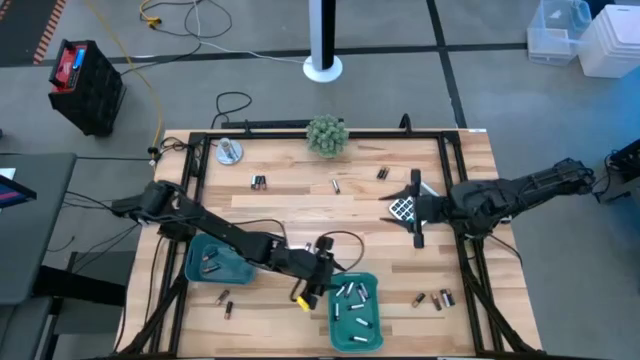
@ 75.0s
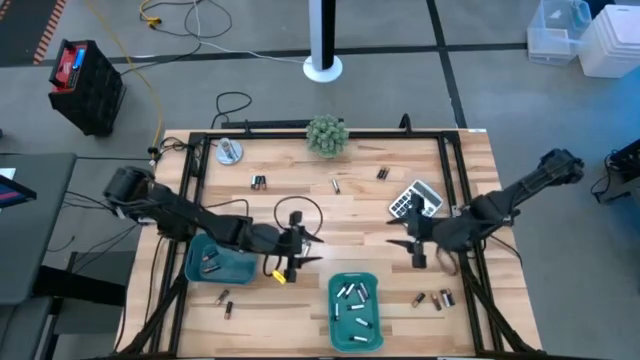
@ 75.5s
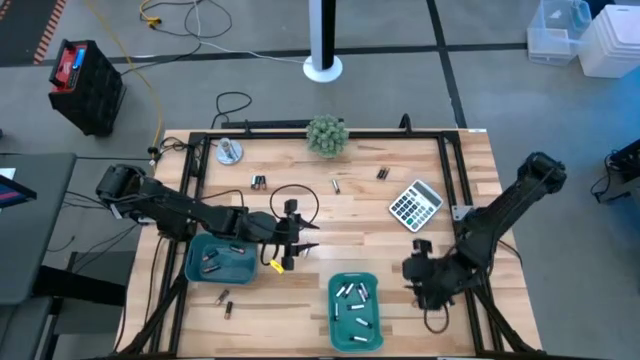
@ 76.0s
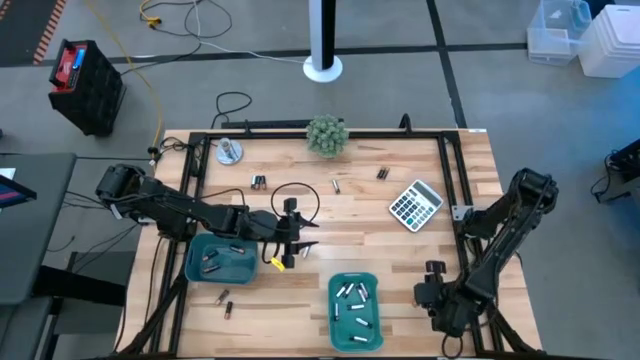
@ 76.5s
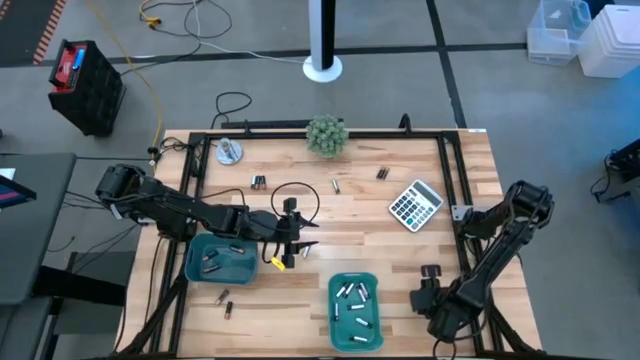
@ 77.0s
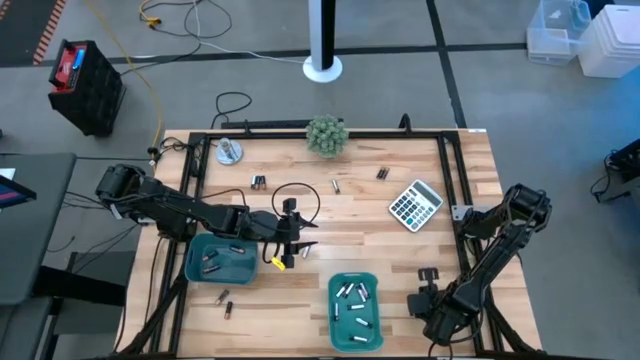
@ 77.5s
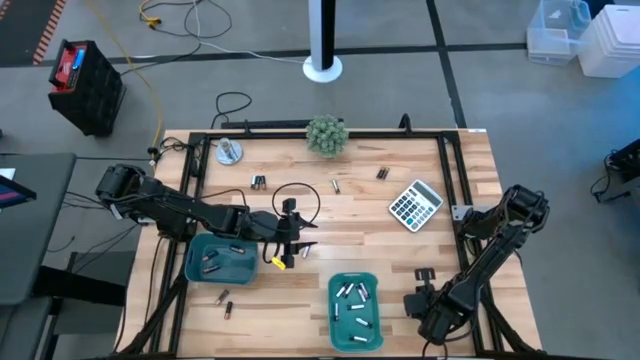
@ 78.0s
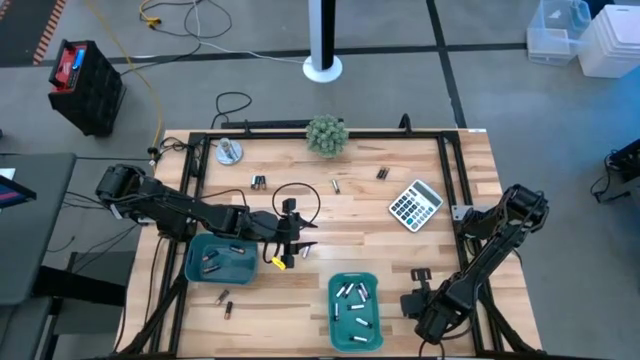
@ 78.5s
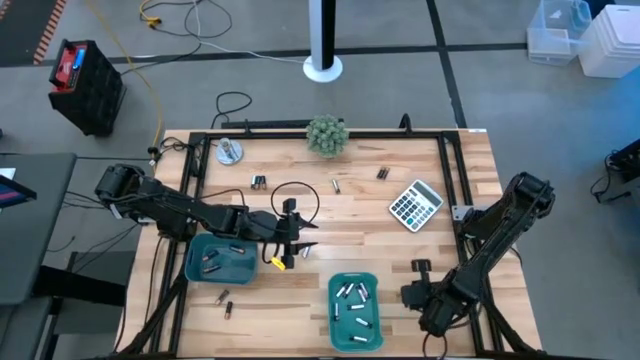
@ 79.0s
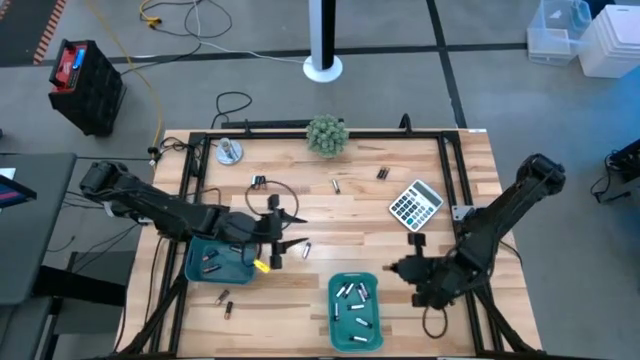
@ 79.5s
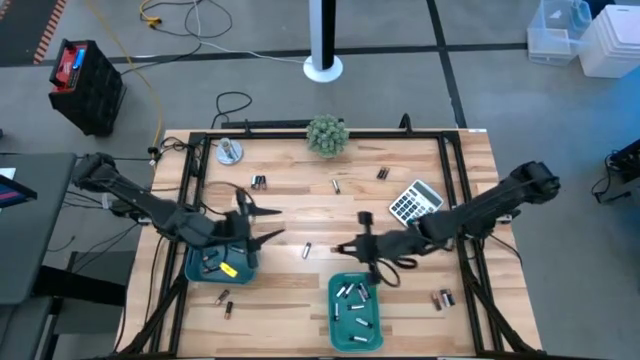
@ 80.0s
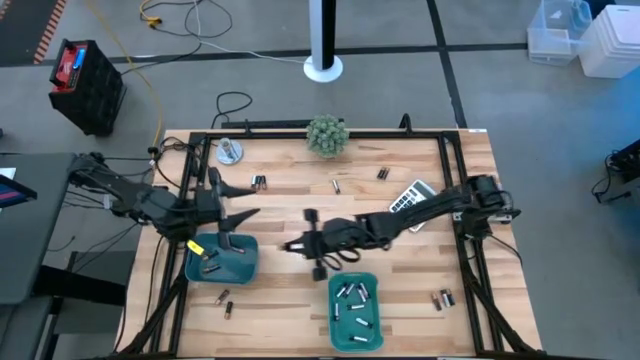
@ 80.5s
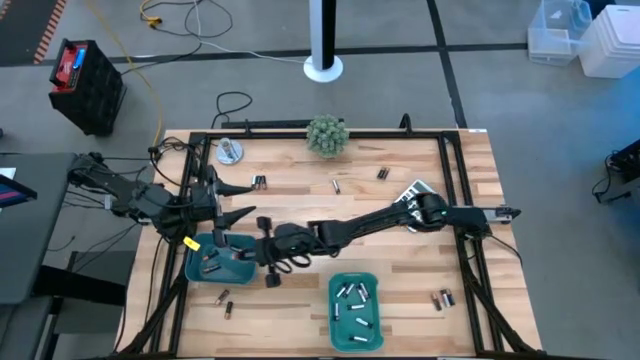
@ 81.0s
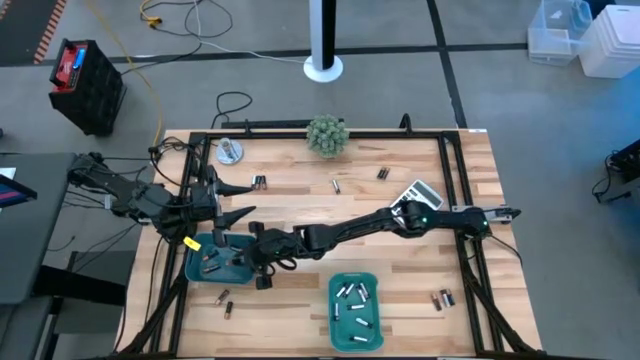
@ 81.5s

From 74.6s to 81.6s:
Task: Sort batteries
Put the black battery into the blue bin

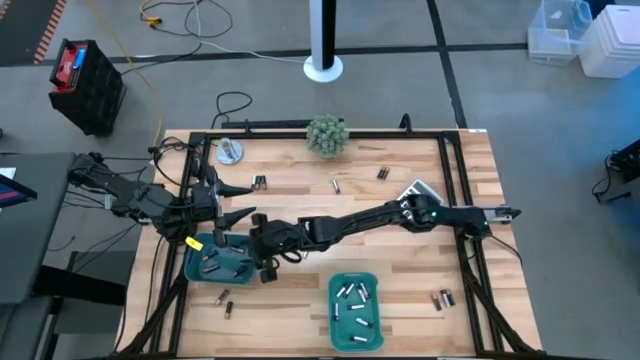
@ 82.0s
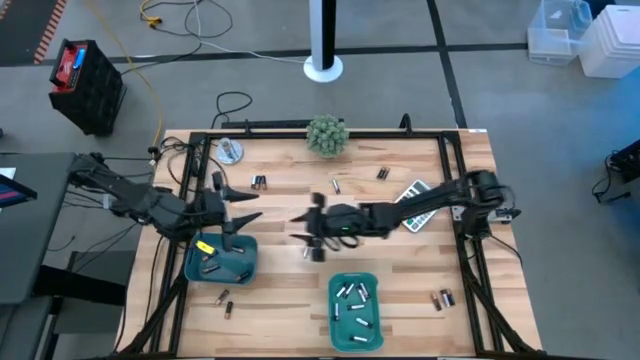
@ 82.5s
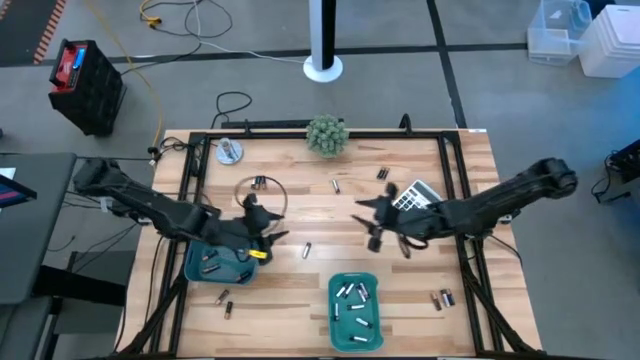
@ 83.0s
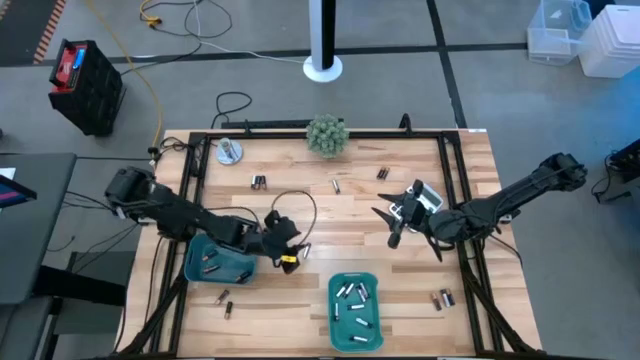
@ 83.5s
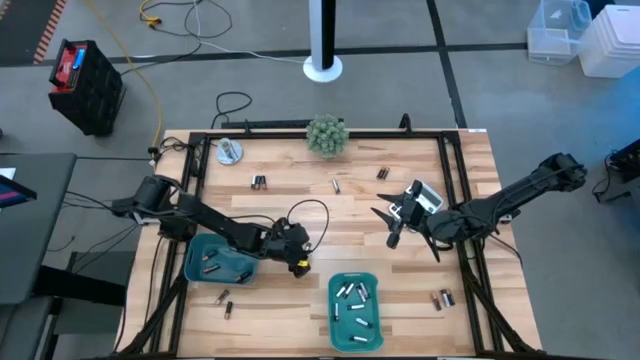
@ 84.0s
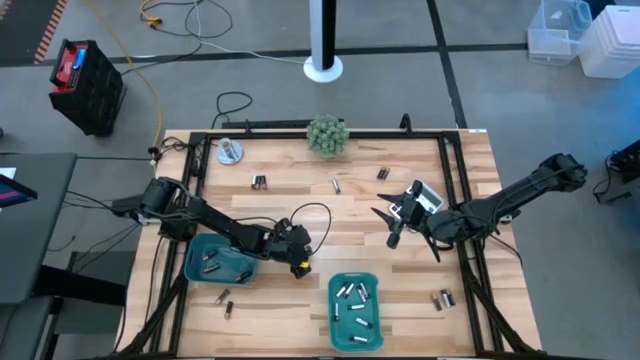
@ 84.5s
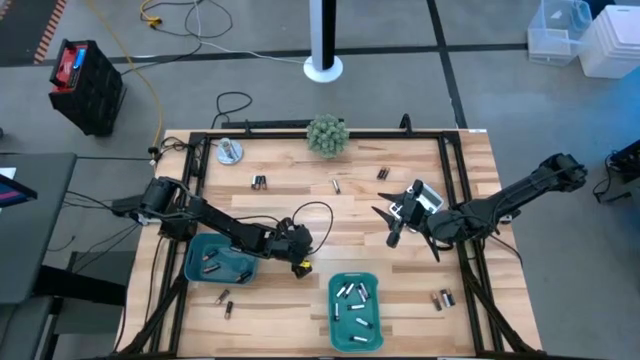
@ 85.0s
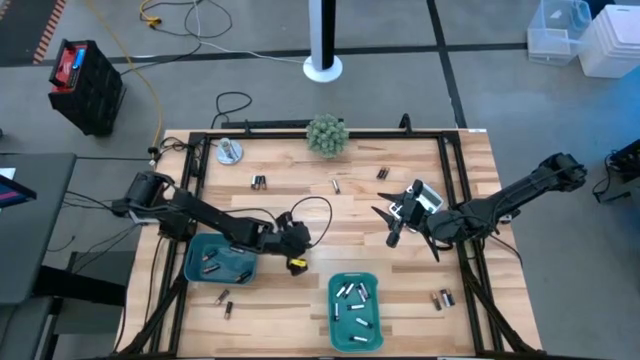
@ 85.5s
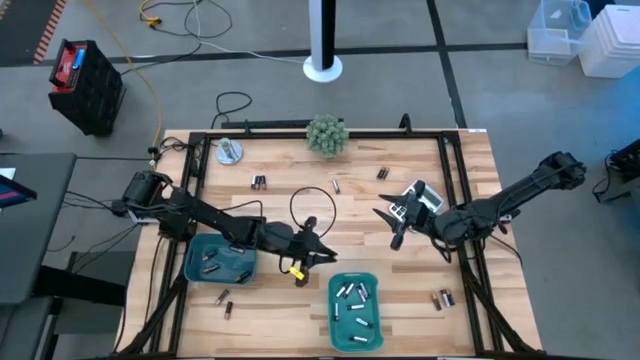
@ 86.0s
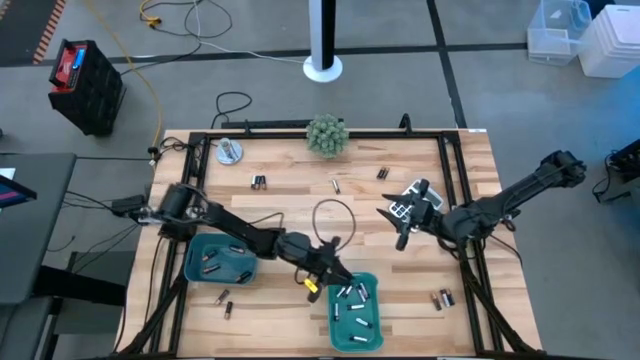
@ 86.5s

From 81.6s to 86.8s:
Put the silver battery into the green bin

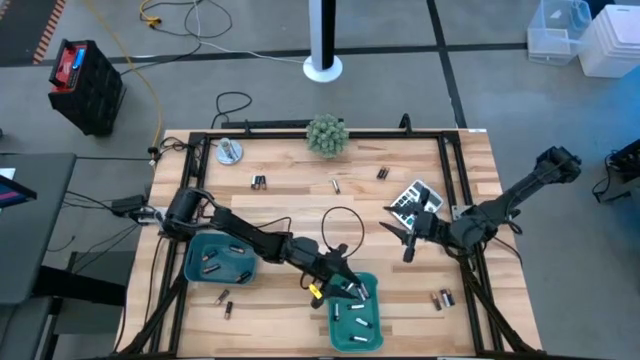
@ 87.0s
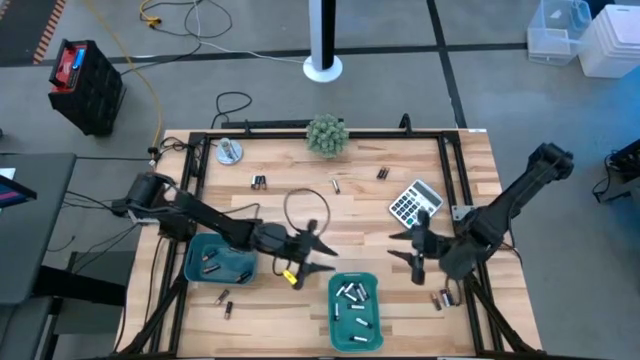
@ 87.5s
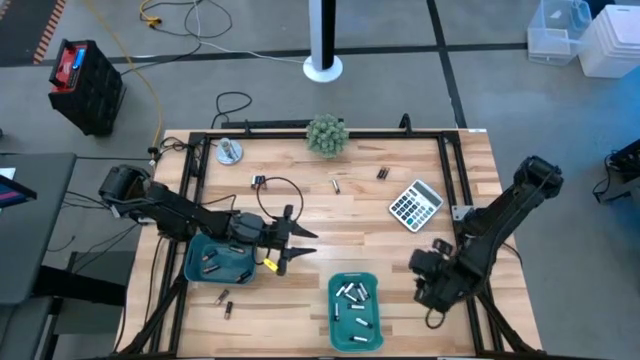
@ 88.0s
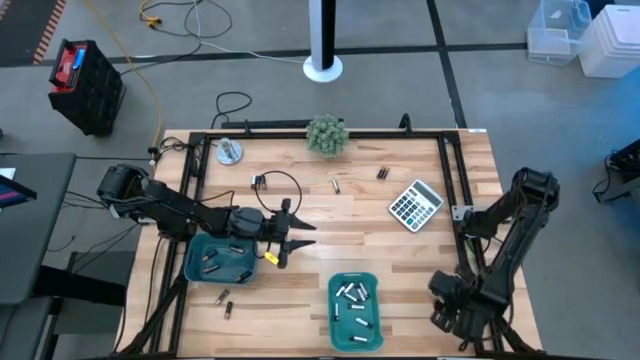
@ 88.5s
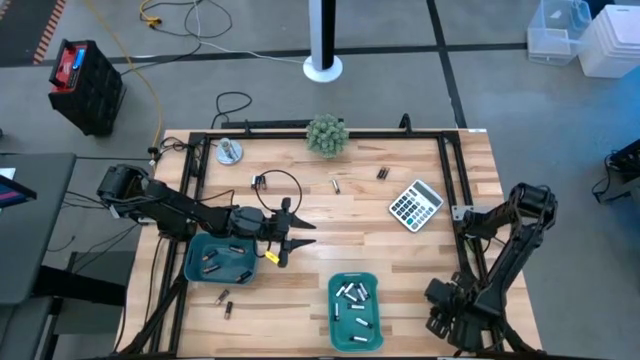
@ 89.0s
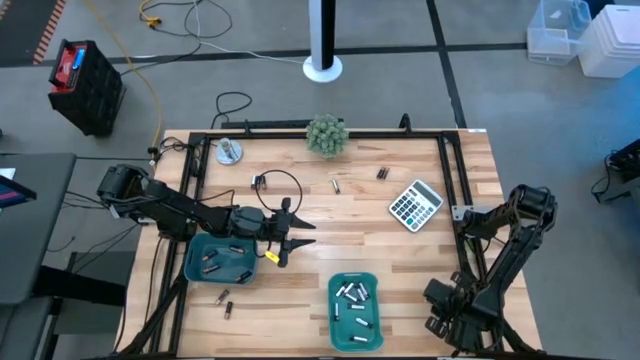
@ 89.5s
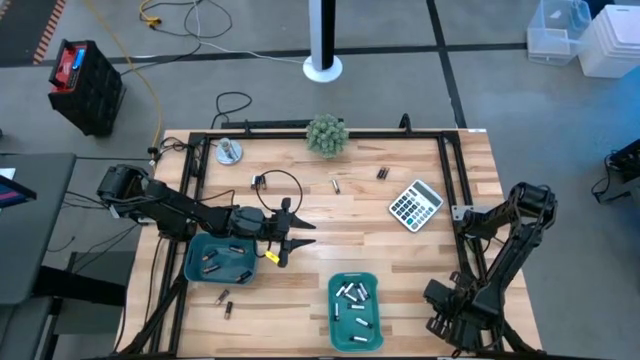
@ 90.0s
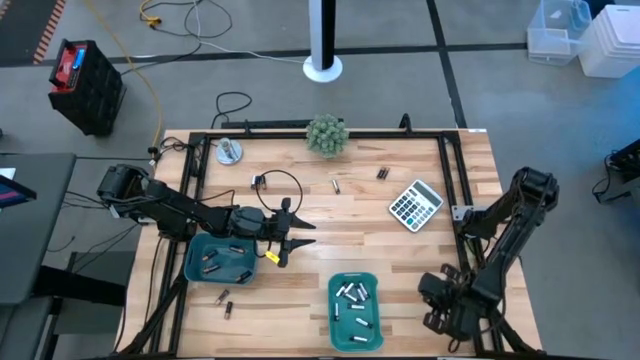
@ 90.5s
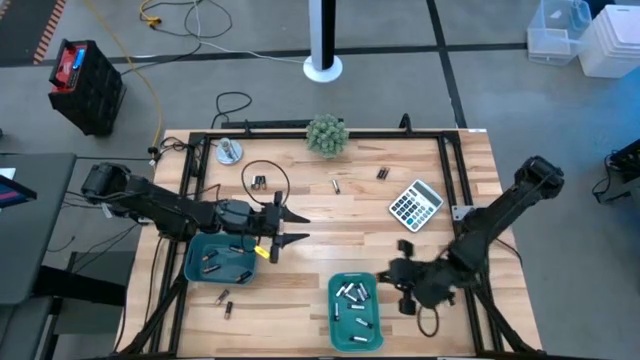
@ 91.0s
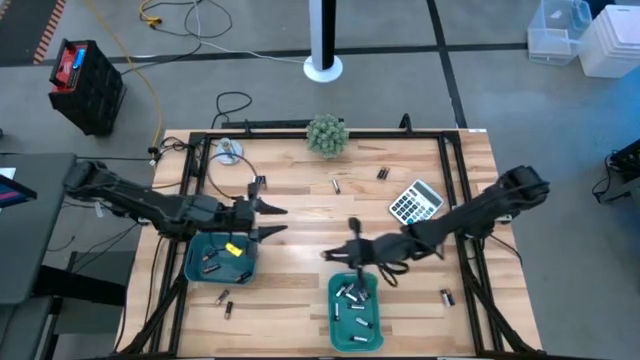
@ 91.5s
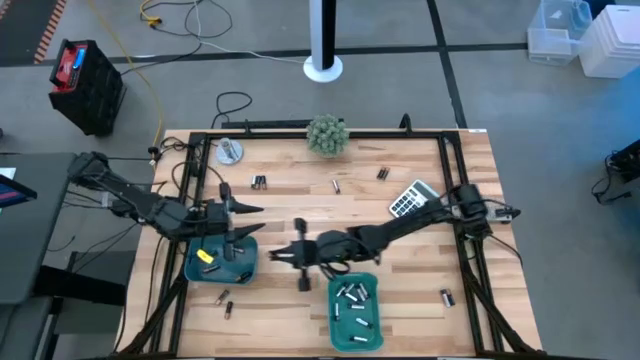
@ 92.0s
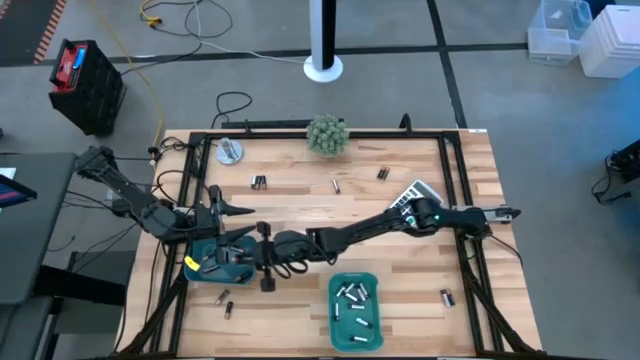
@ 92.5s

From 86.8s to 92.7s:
Put the black battery into the blue bin

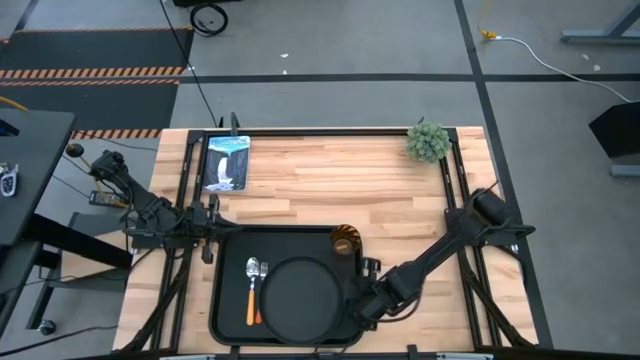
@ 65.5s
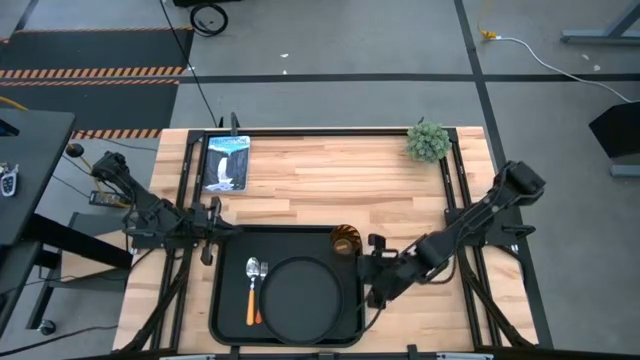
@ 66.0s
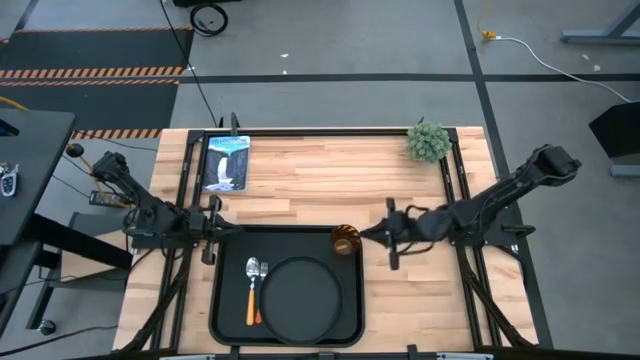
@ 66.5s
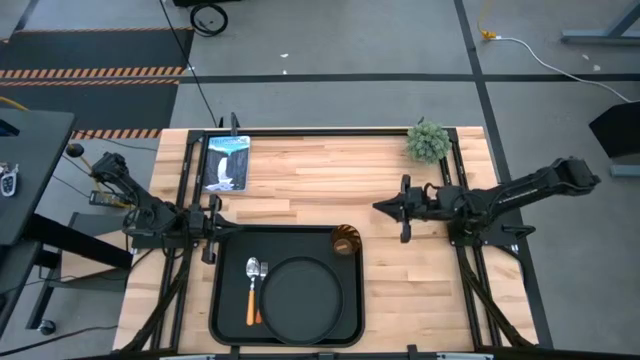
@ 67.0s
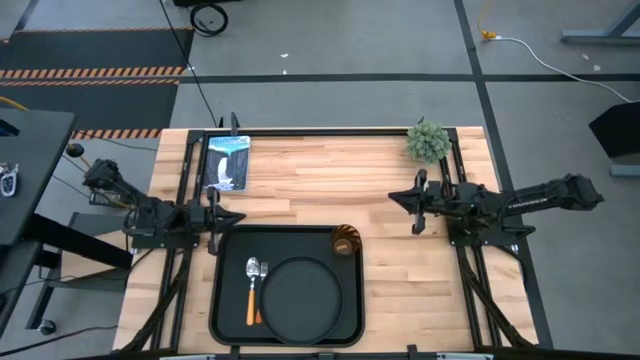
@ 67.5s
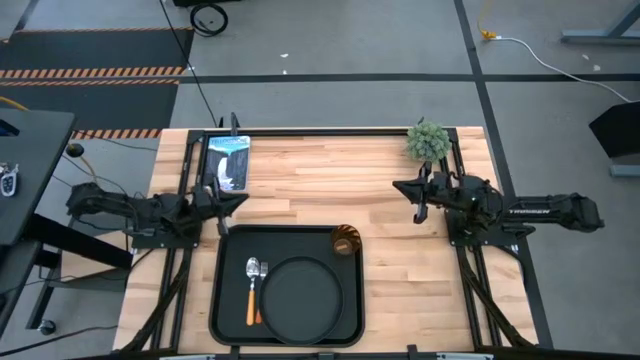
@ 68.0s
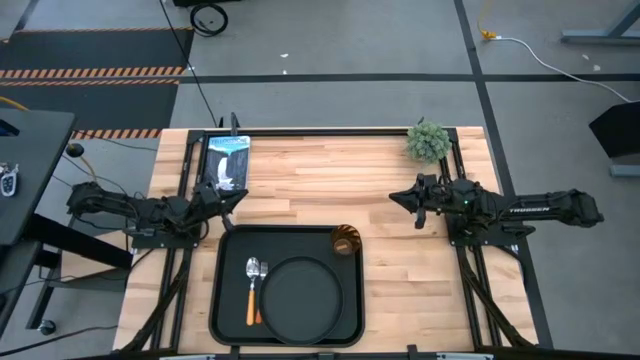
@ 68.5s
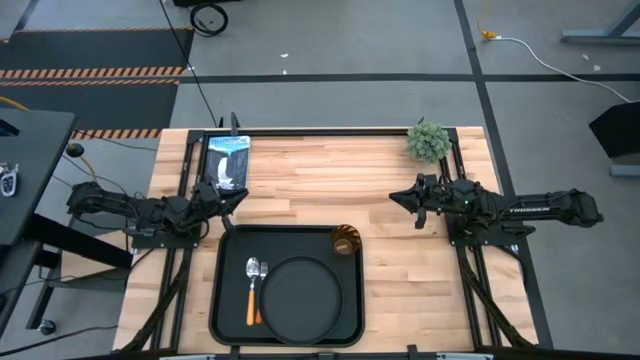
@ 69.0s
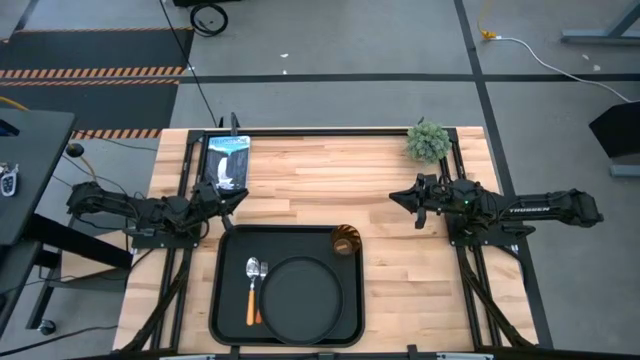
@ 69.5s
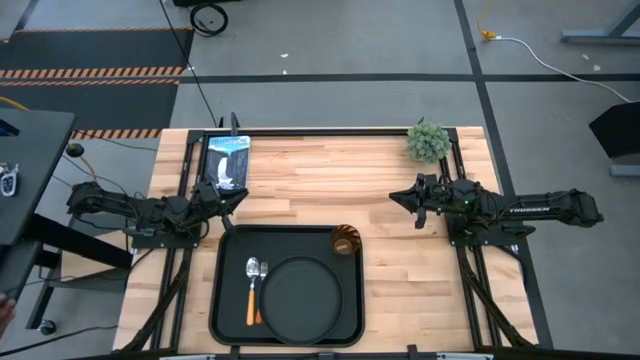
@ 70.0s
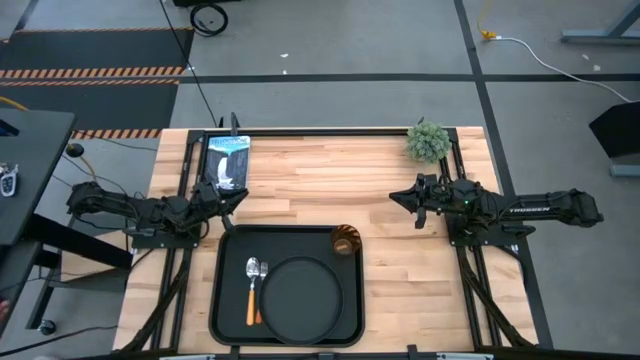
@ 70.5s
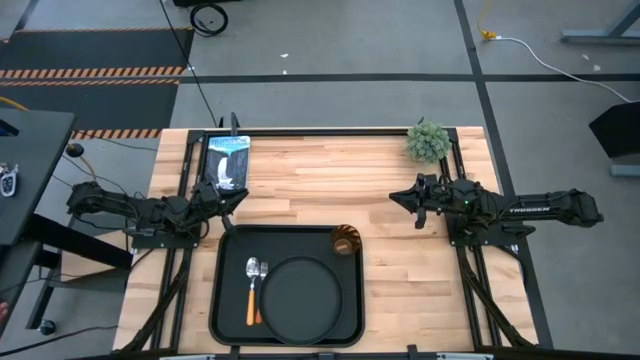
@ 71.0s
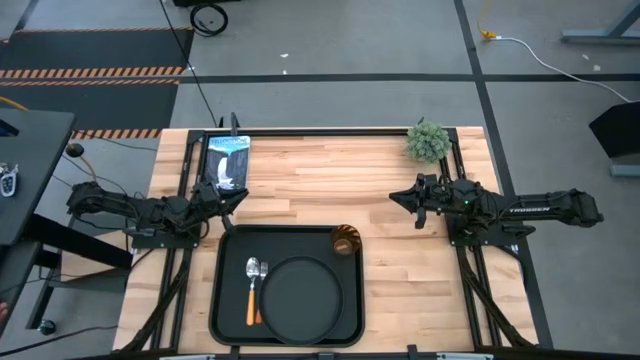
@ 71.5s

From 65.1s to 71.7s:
Task: Pick and place plate/cup/fork/spoon on tray
Return to Home Position
